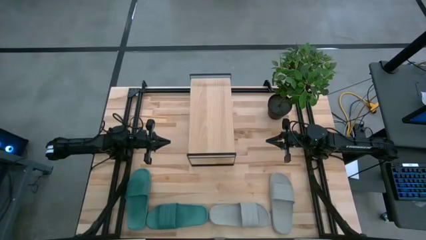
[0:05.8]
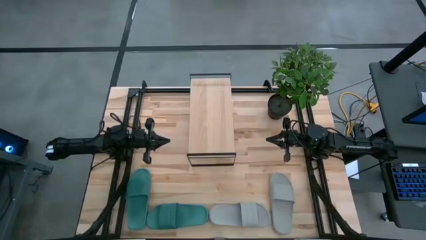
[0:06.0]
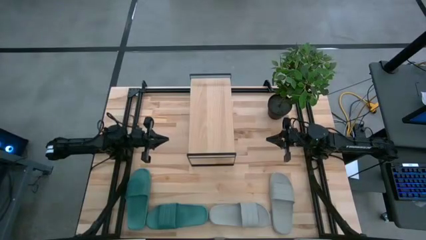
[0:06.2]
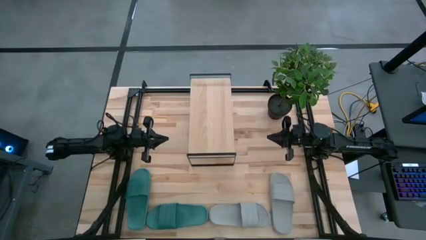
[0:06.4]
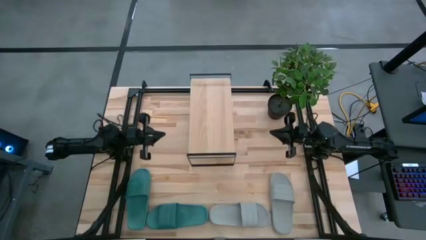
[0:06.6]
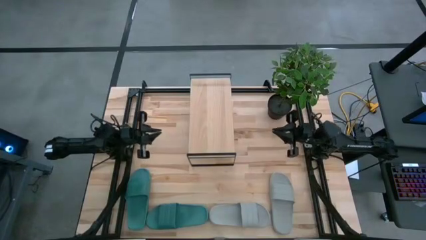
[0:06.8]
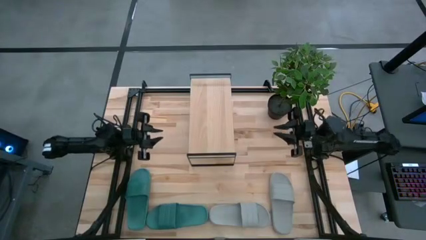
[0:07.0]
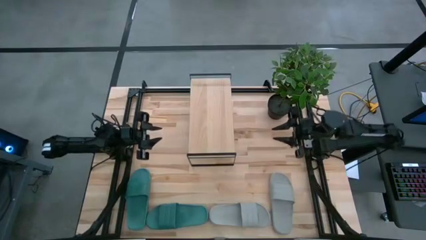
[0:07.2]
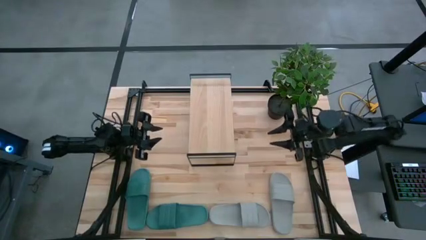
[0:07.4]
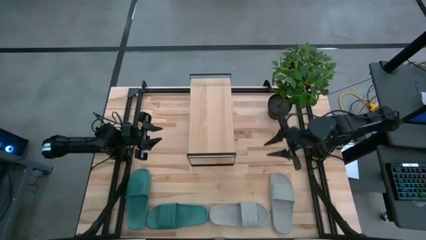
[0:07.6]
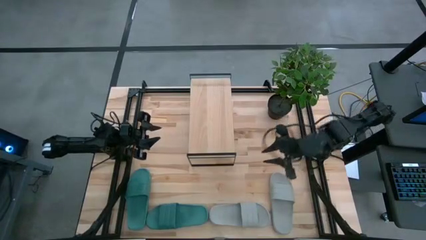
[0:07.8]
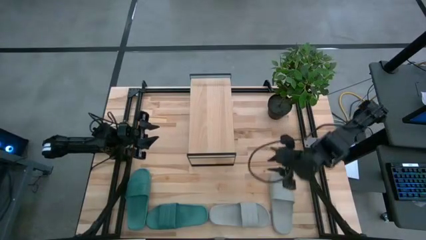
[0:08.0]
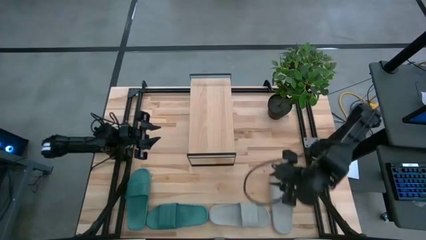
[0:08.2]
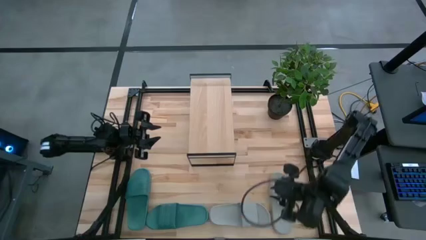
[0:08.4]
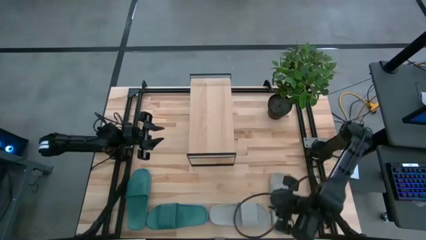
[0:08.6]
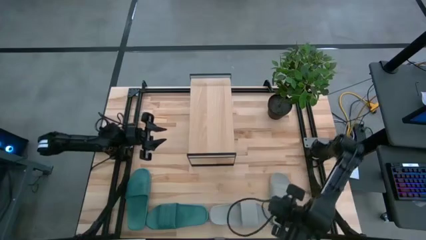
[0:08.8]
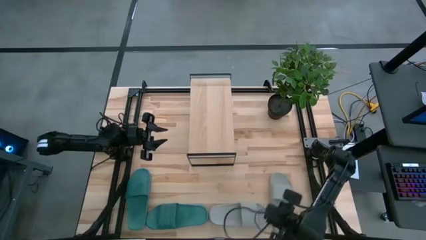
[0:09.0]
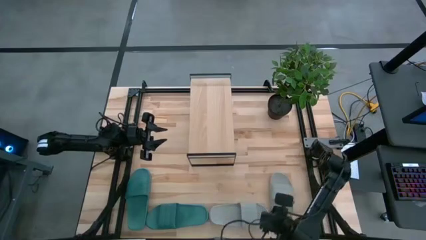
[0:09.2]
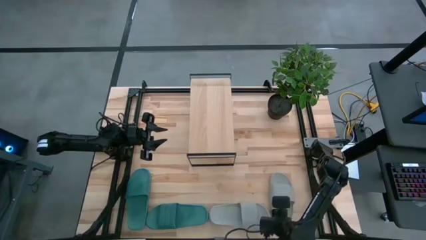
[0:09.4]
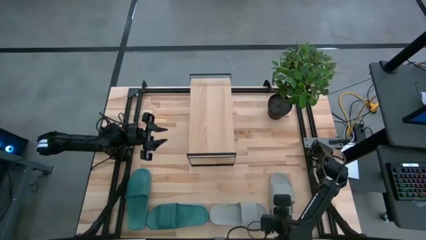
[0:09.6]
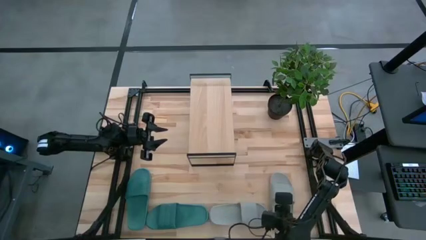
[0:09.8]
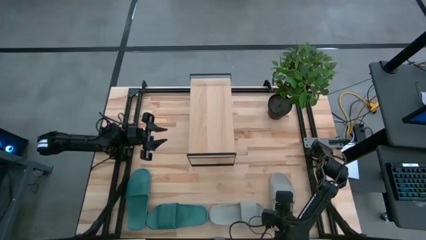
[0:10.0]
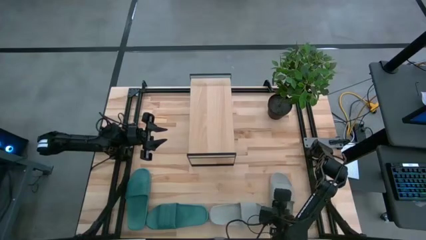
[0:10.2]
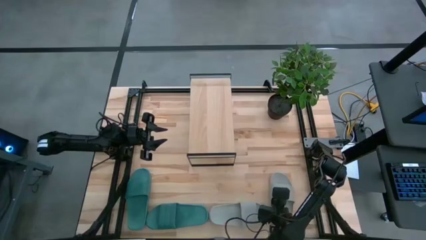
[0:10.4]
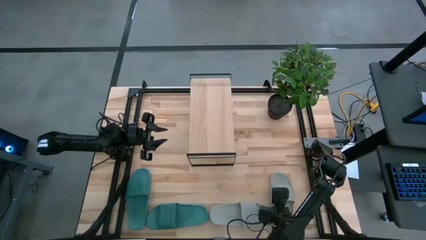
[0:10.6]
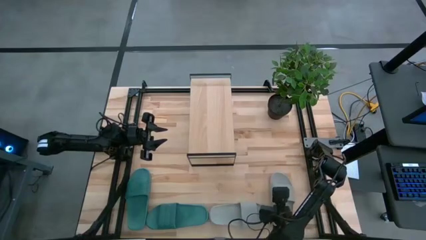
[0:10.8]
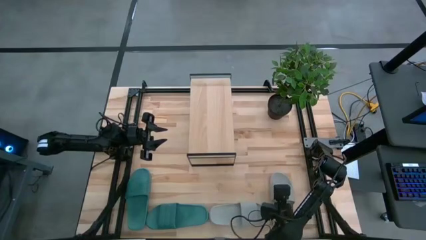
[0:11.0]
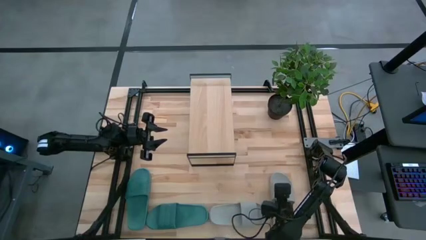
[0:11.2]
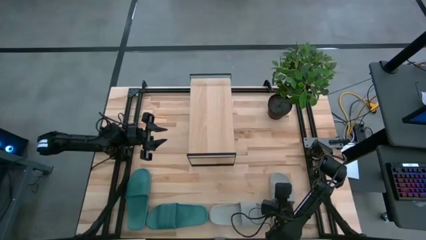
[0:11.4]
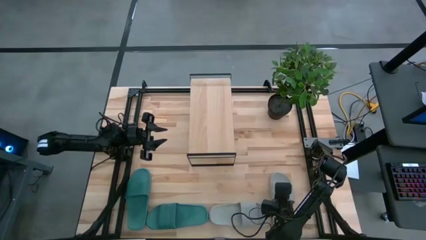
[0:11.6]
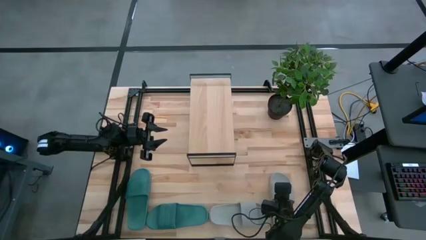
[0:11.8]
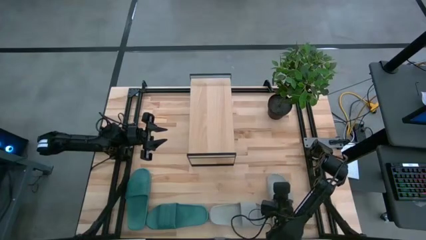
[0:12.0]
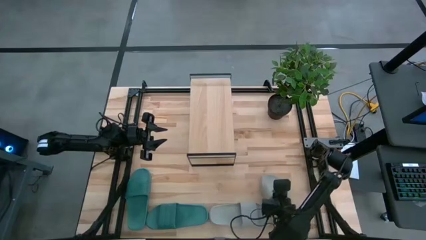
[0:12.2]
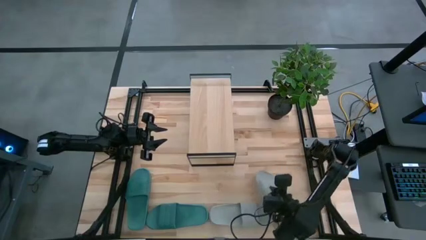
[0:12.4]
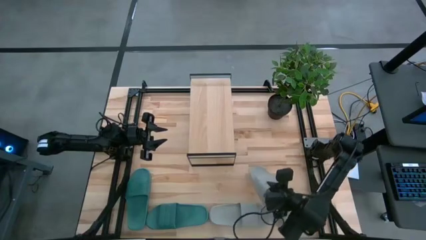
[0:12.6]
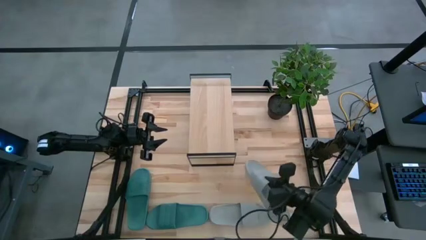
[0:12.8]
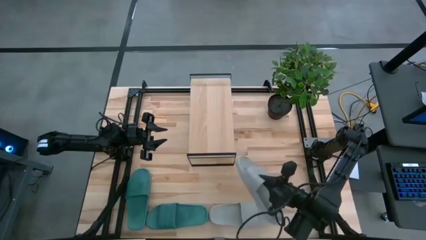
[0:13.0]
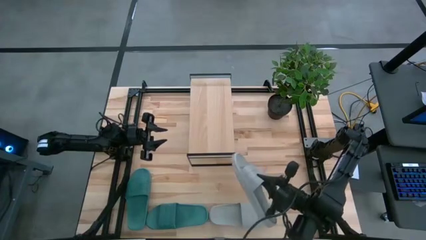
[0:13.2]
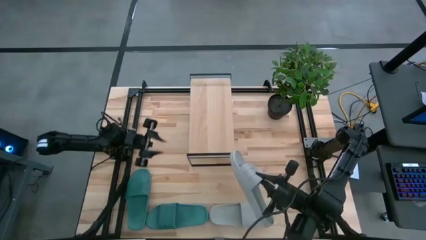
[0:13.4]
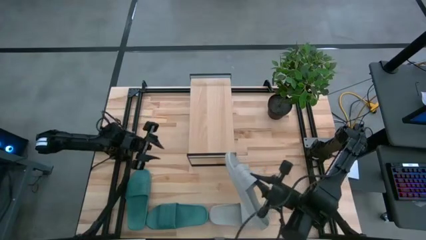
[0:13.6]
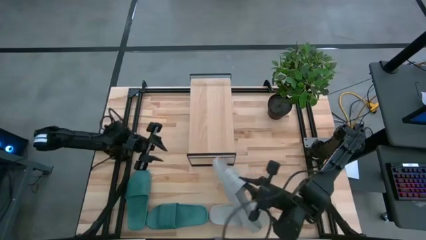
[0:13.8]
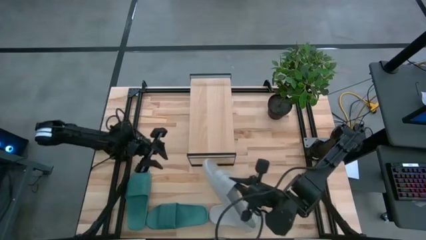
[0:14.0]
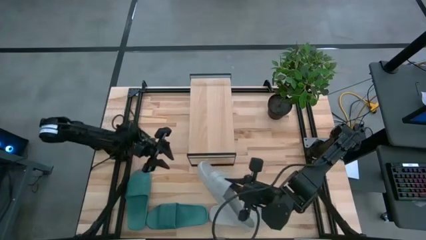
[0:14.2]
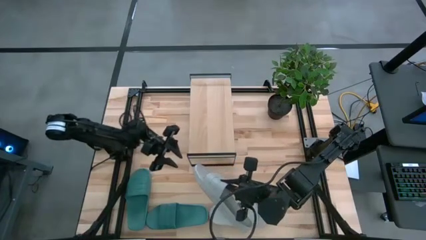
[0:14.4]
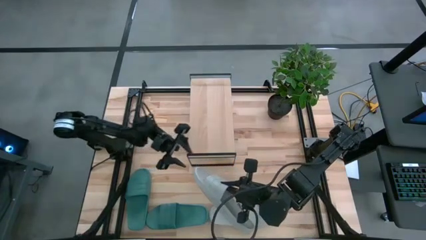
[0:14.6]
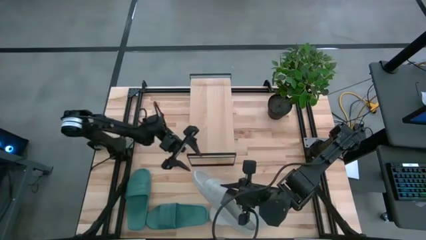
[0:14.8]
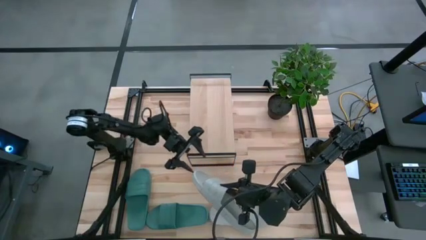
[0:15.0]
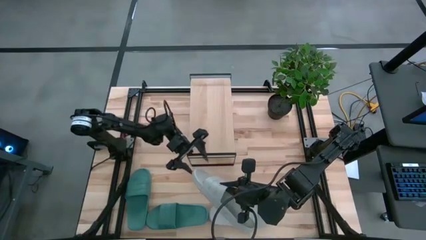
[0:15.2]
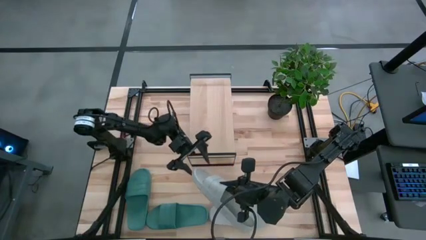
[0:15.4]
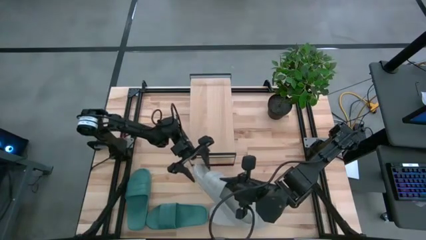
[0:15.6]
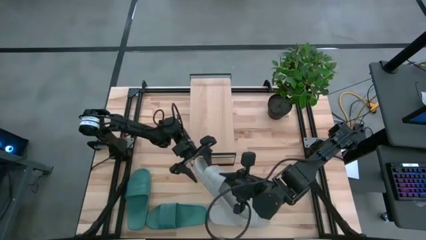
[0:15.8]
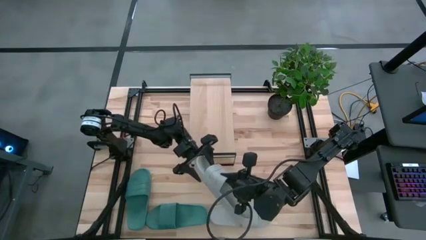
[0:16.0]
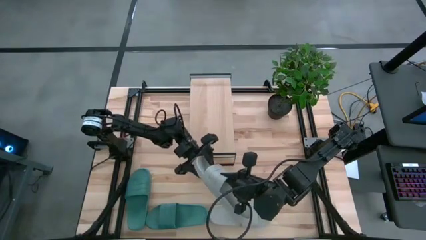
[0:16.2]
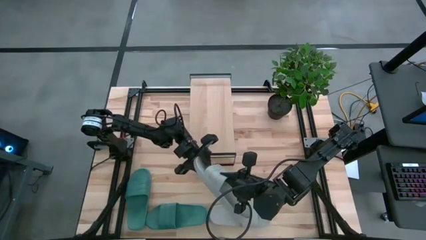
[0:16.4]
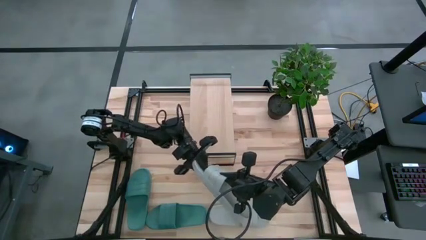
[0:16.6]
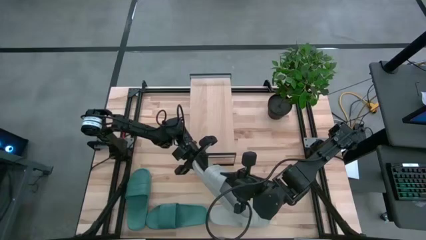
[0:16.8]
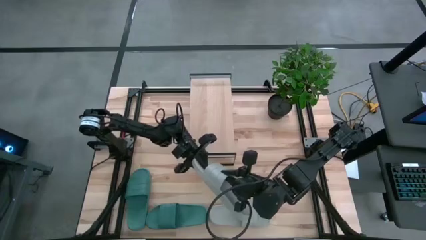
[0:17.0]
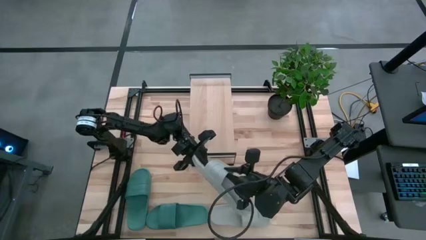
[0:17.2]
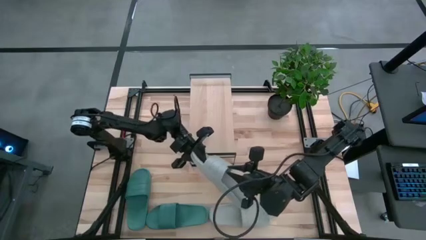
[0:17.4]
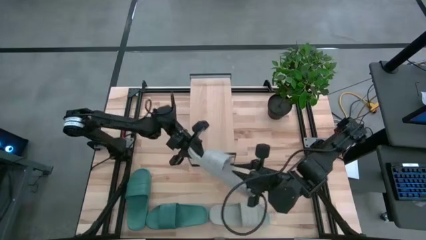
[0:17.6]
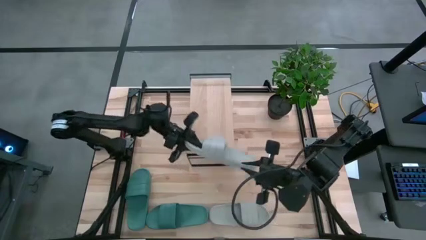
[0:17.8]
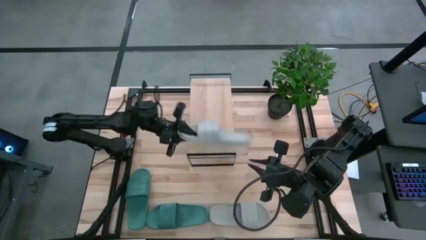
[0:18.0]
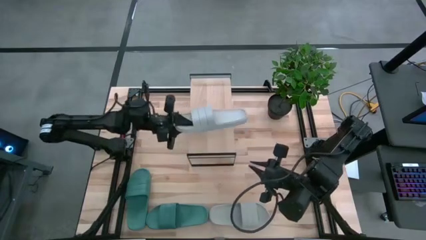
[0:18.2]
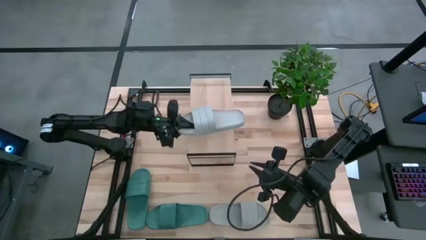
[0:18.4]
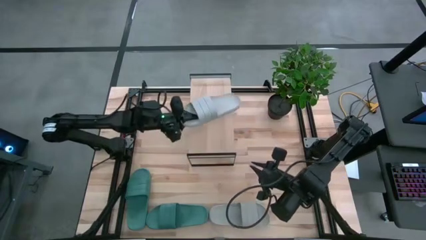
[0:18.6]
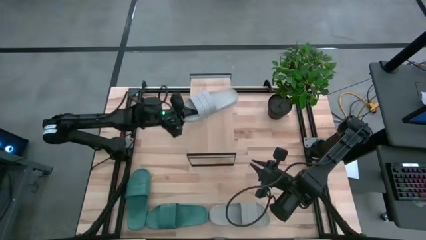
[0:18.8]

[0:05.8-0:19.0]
Task: Pick and place slides into the shelf
Put the right gray slide on the shelf

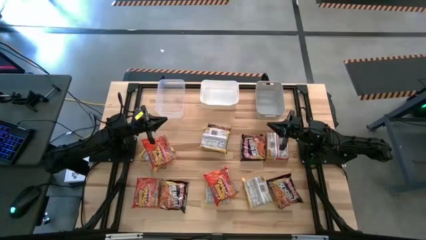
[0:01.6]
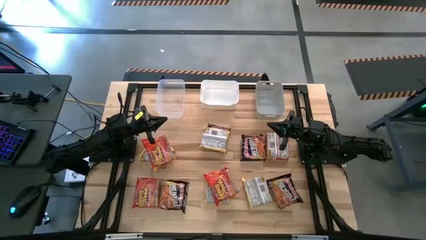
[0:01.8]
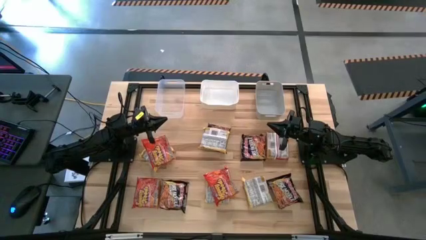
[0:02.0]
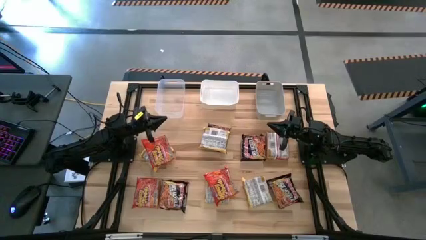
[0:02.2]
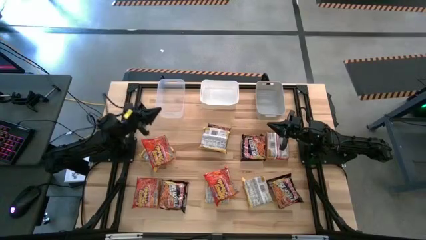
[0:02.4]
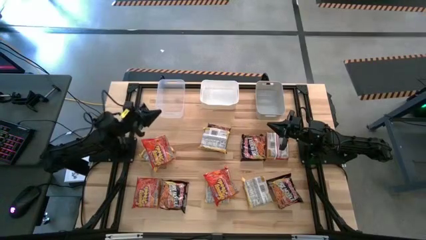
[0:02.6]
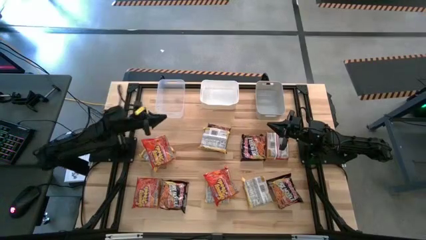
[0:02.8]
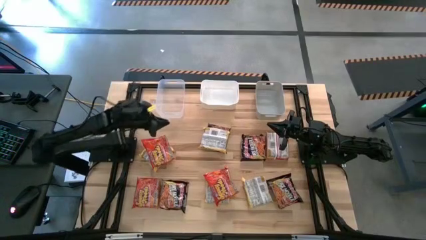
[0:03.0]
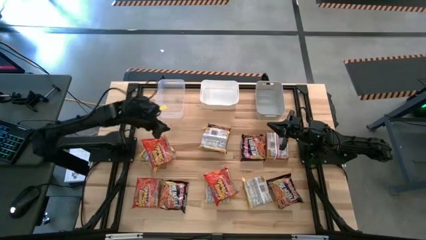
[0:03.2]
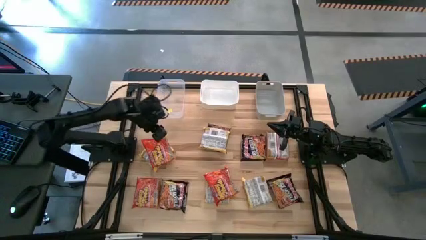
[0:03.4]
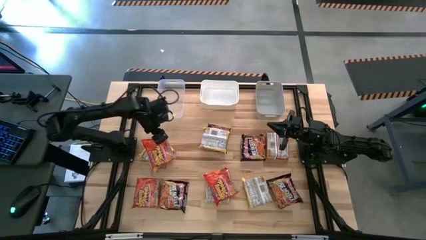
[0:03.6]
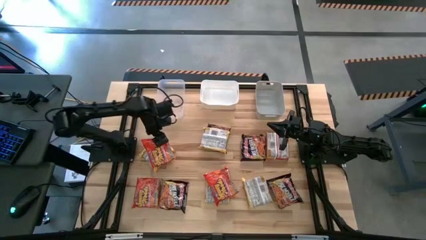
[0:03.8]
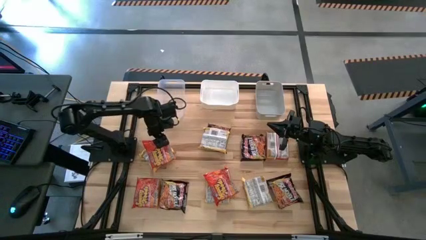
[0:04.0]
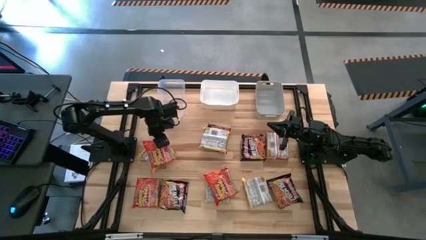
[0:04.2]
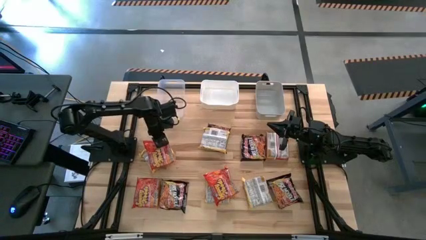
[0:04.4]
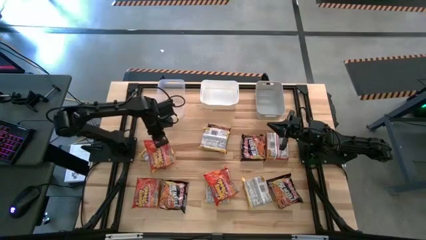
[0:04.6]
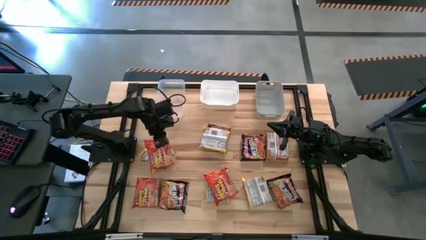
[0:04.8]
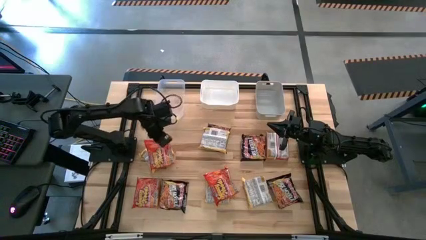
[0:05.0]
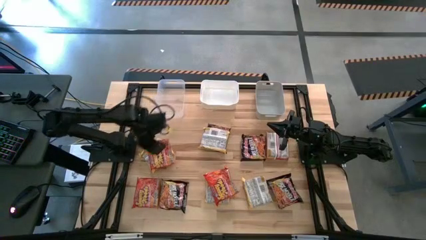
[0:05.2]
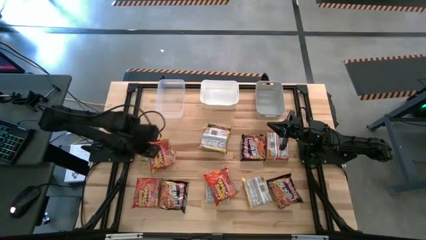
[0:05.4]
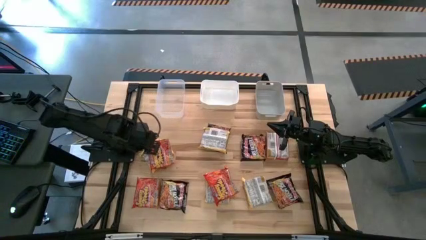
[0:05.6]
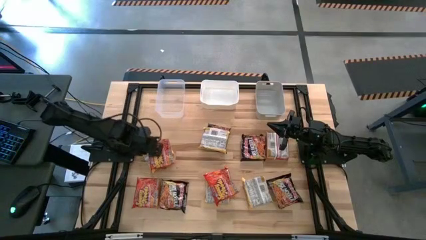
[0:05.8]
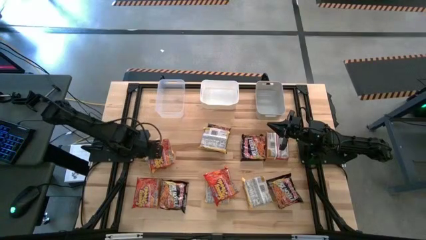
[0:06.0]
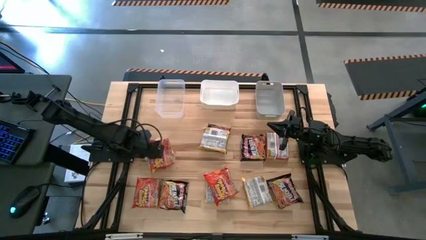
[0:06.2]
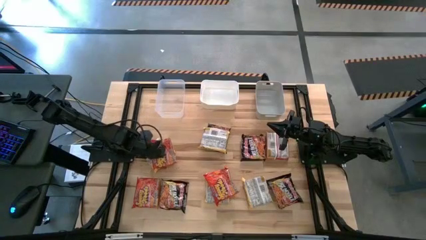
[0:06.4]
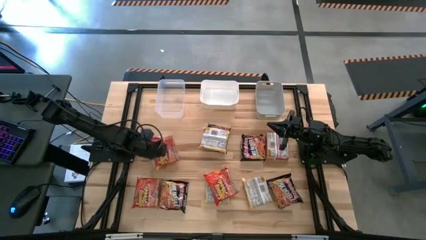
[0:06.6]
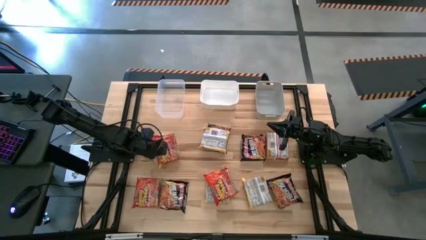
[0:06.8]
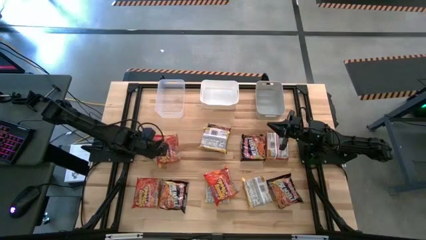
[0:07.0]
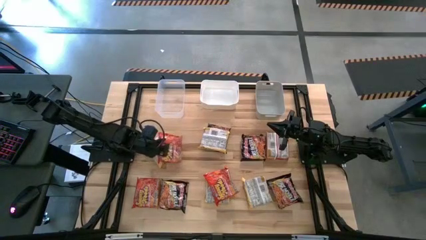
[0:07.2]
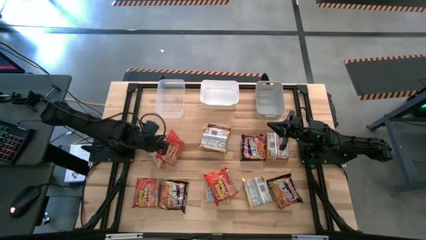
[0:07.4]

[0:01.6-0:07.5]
Task: Sort Maruchan noodles
Put the orange noodle pack into the transparent bin
